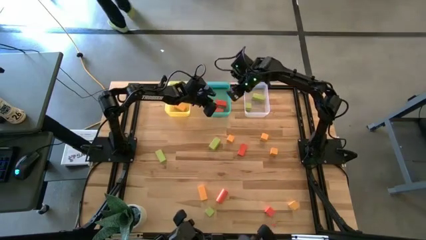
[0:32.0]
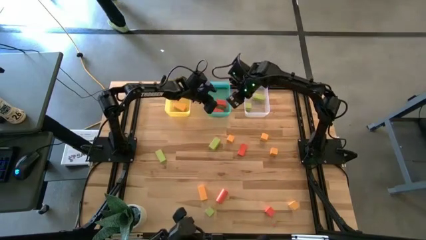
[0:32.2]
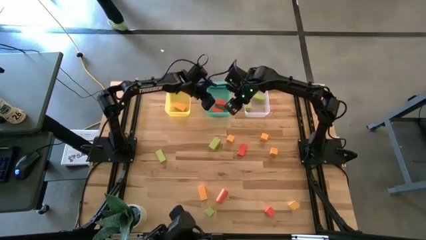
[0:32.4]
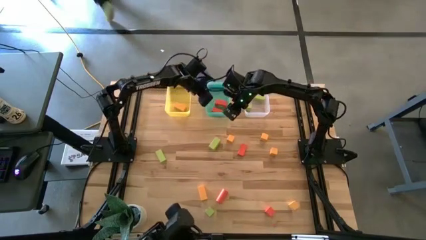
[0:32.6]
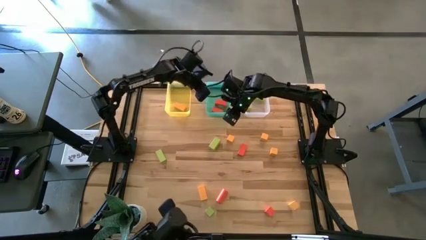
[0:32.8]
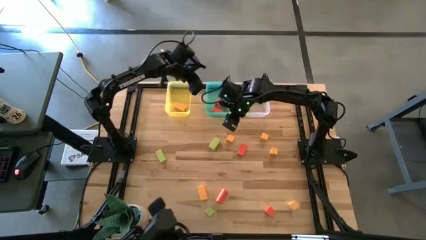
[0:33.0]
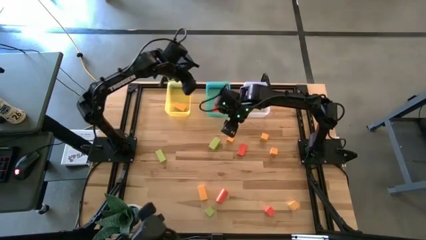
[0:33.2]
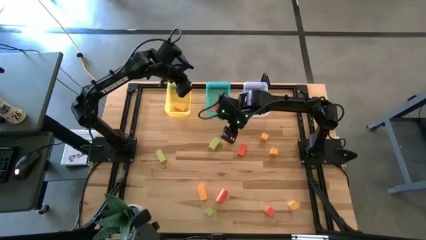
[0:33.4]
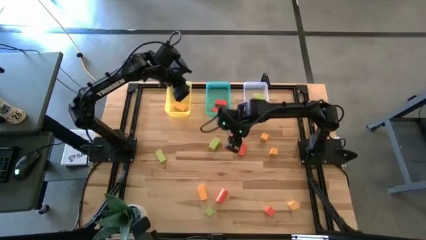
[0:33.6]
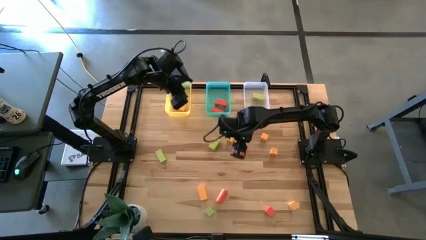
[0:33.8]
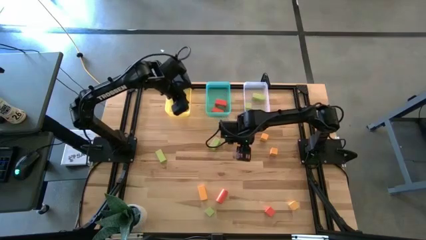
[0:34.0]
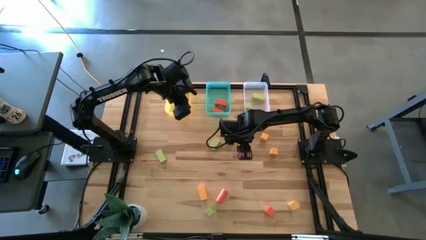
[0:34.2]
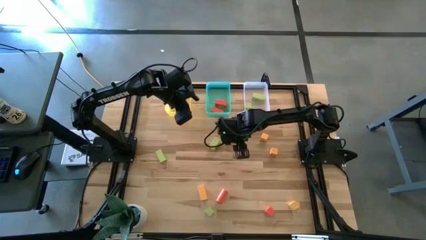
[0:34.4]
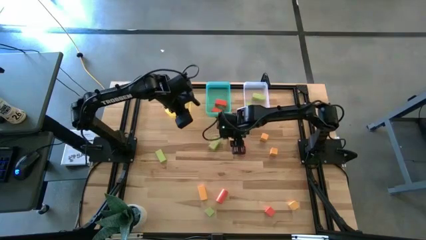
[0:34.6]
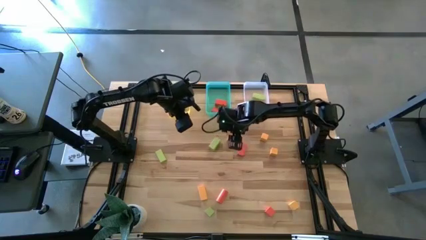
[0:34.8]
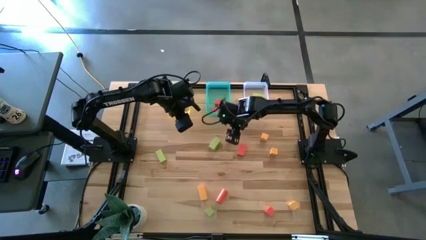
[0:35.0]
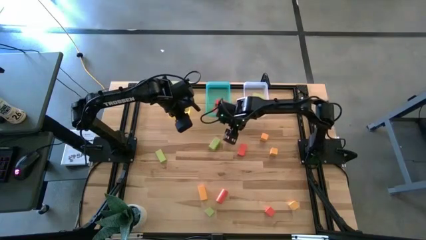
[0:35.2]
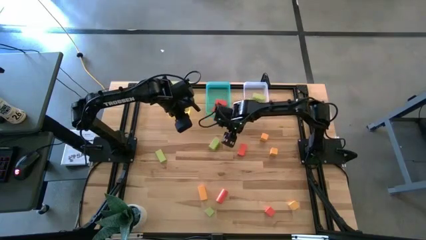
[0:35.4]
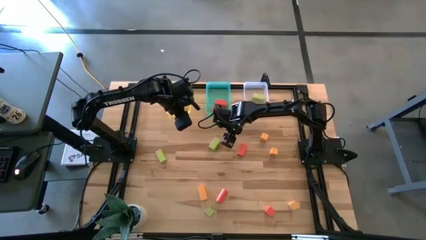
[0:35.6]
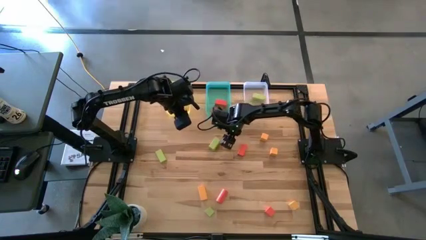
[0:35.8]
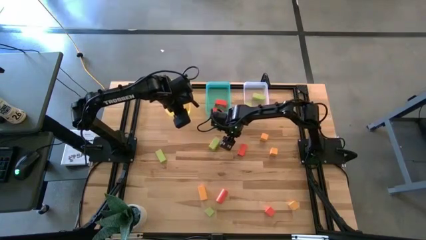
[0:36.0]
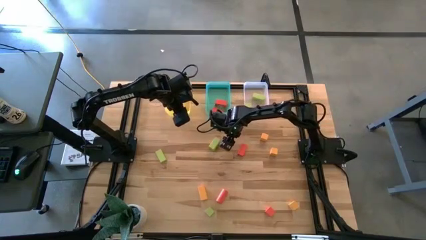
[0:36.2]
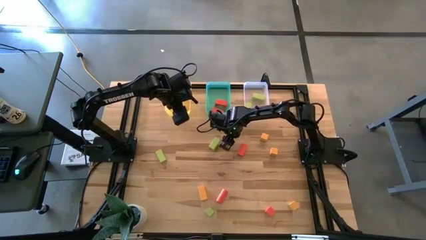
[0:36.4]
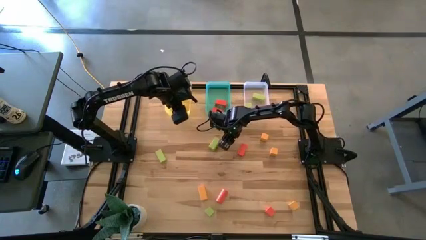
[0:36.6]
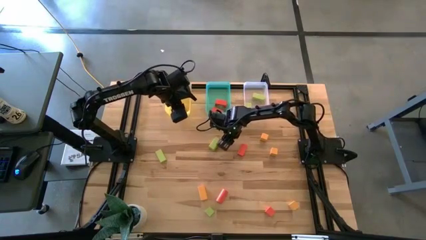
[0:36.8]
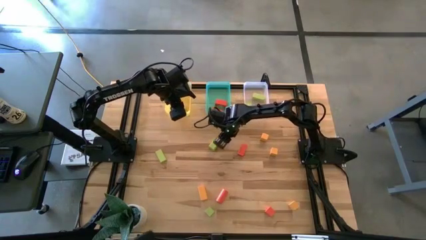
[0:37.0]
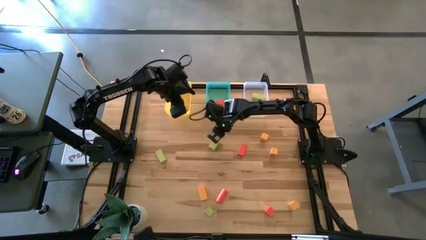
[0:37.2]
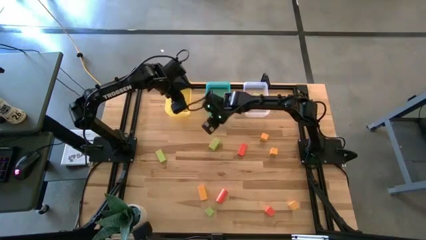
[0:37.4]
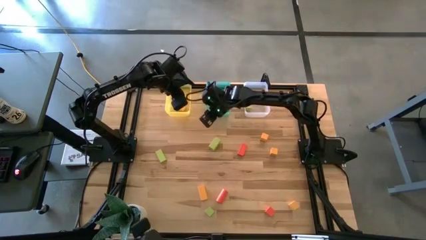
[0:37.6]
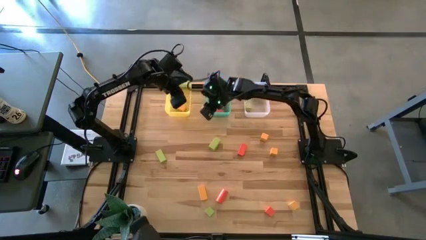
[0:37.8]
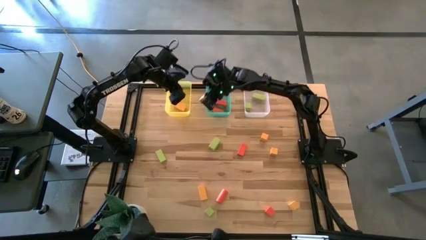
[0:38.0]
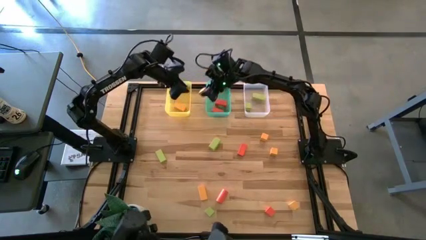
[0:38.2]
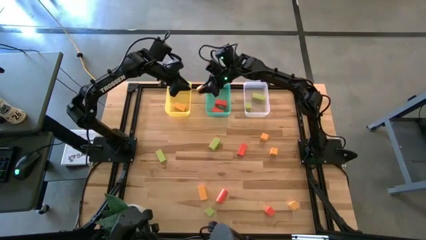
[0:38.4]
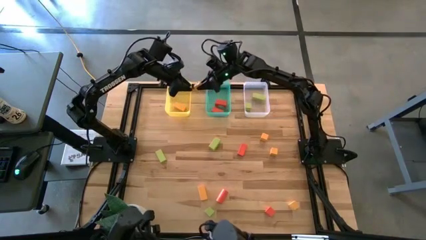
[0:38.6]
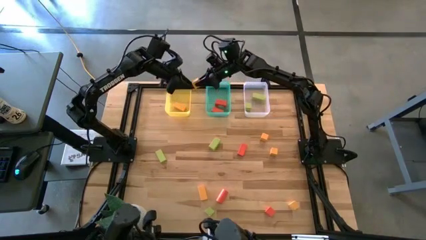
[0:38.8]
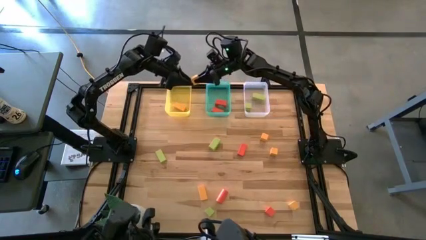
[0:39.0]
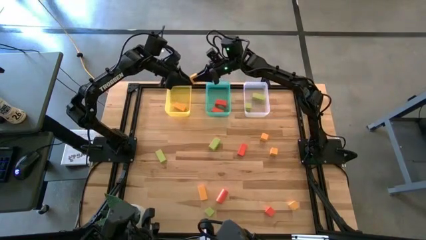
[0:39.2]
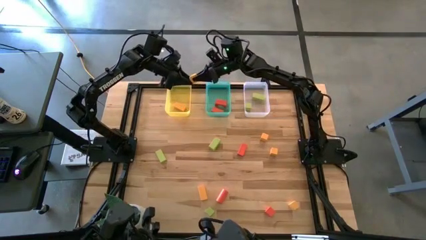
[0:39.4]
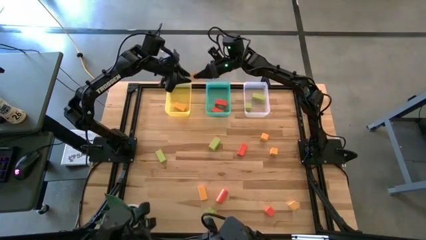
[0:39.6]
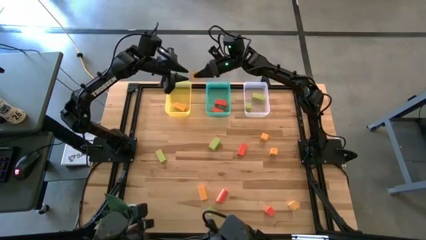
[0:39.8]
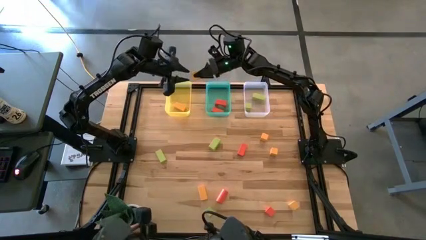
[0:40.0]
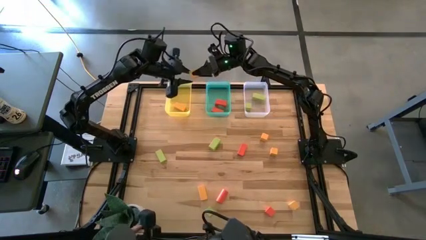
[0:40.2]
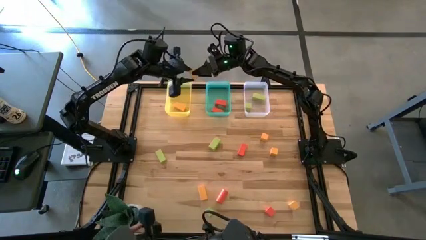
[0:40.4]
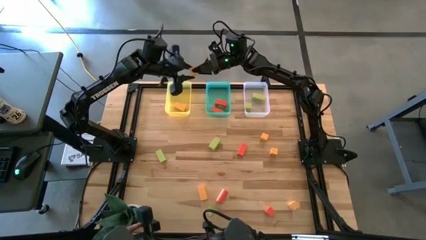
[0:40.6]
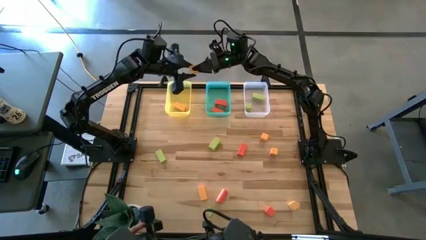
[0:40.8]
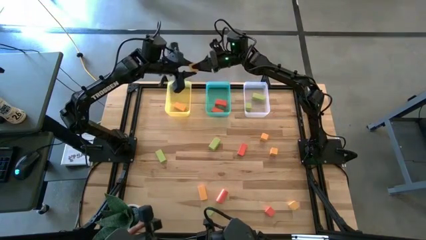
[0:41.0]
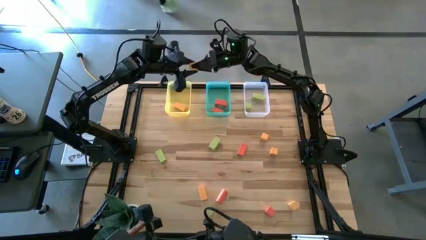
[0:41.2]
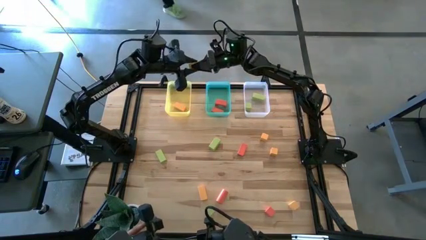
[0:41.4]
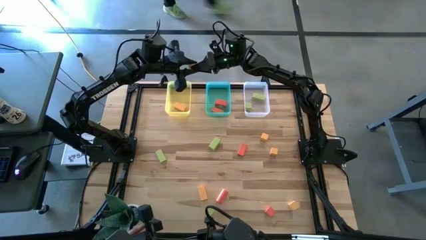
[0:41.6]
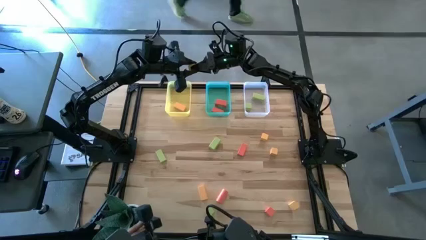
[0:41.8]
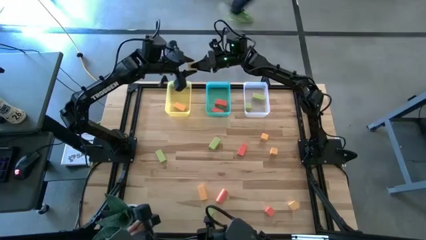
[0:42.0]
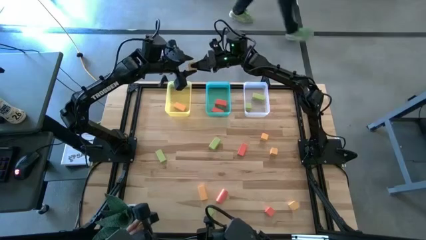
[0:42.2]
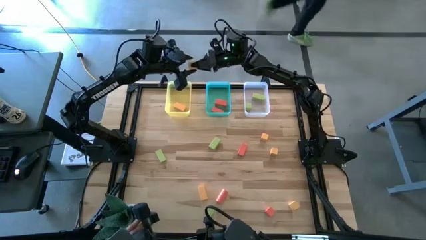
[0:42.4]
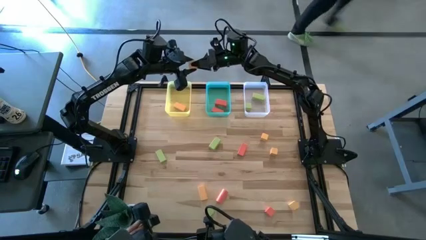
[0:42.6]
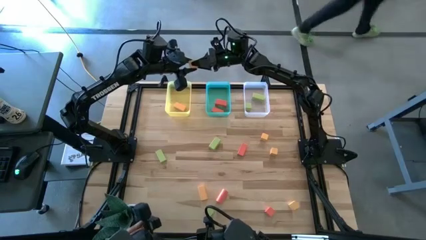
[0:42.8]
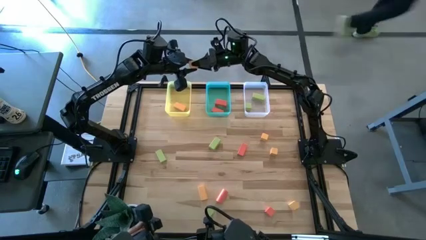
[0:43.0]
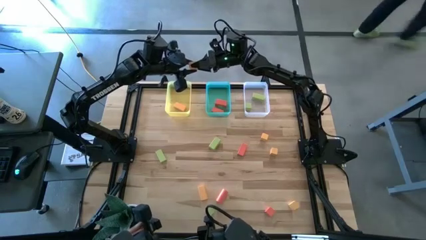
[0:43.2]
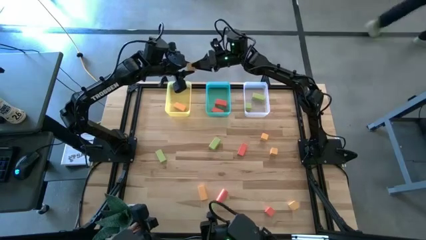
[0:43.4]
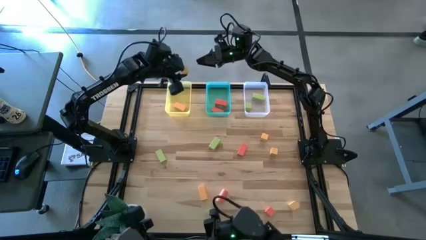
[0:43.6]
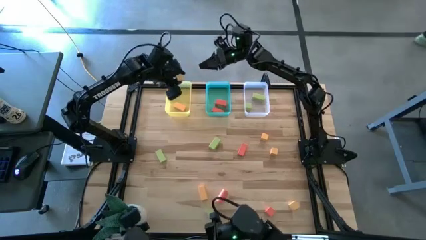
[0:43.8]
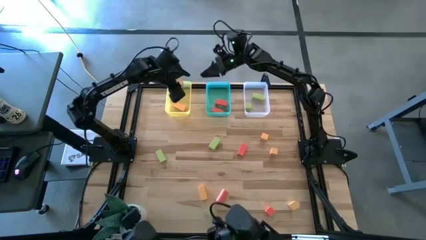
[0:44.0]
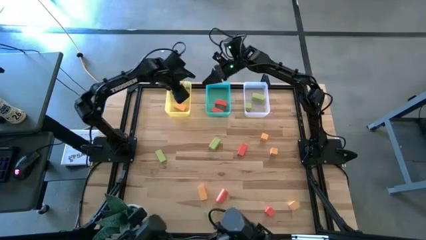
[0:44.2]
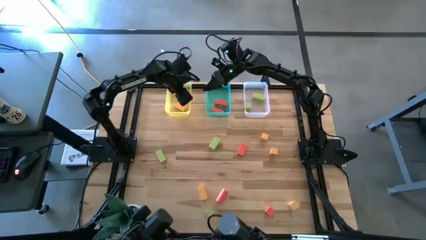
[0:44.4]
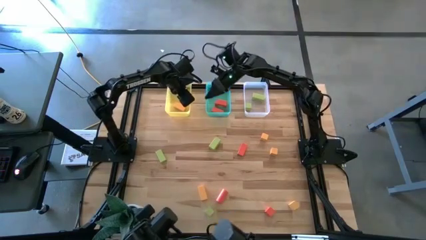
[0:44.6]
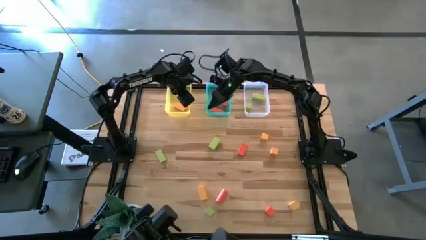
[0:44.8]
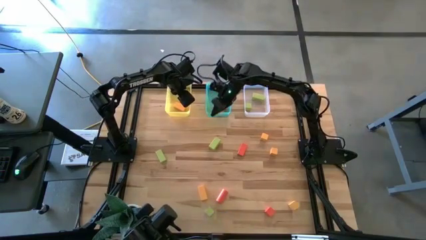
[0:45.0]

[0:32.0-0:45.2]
Task: Sort & place blocks by color
Put the yellow block into the yellow bin

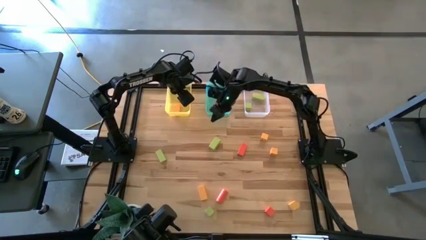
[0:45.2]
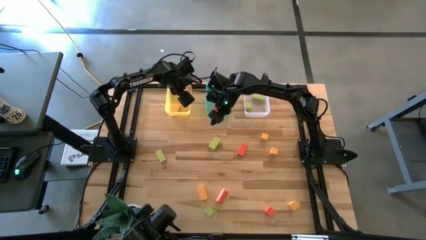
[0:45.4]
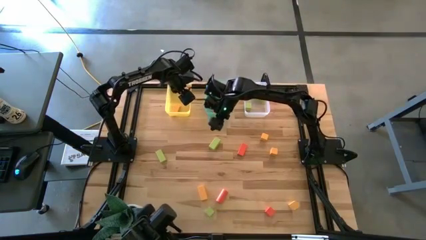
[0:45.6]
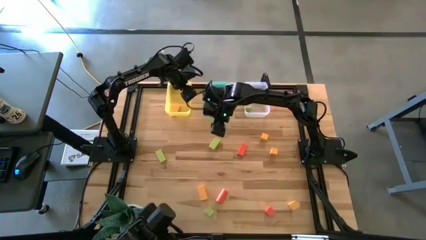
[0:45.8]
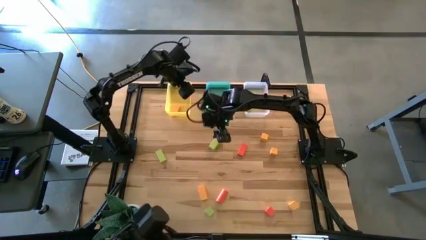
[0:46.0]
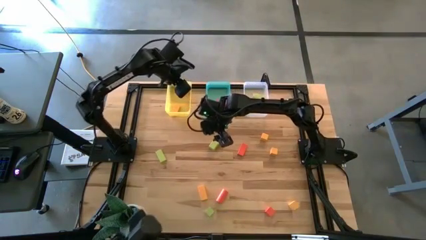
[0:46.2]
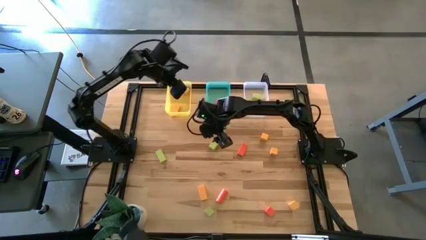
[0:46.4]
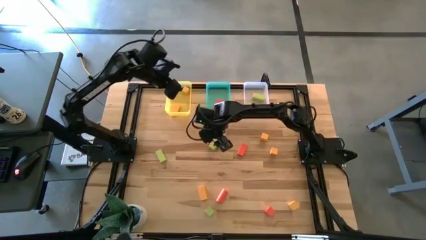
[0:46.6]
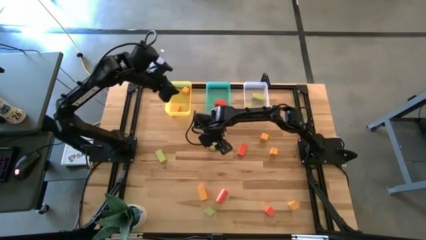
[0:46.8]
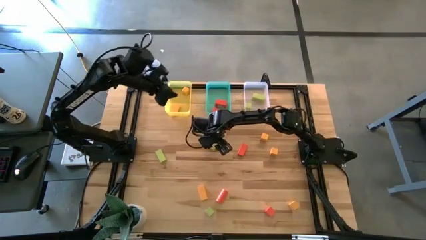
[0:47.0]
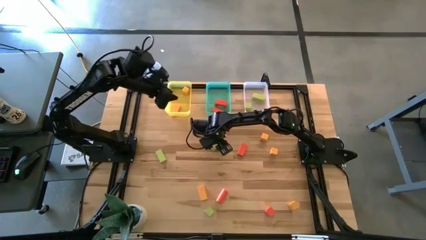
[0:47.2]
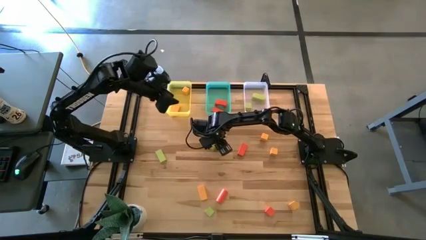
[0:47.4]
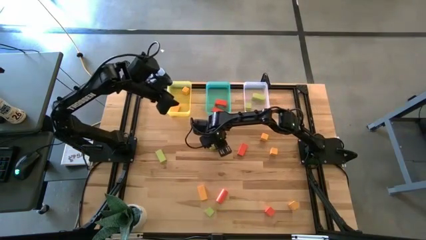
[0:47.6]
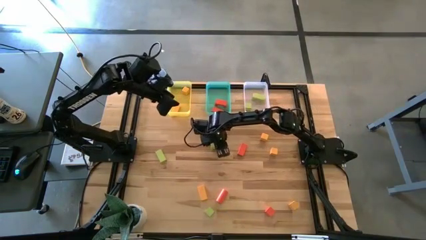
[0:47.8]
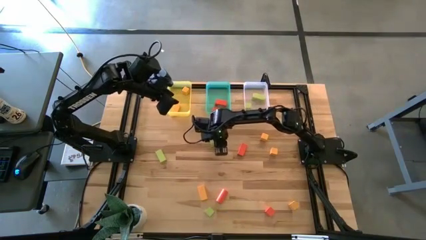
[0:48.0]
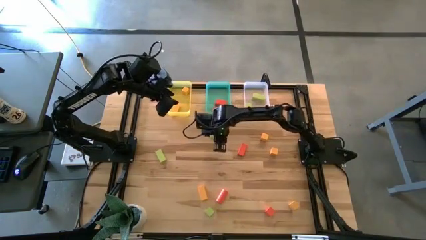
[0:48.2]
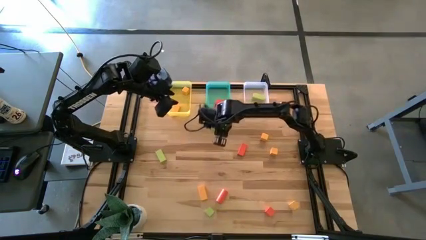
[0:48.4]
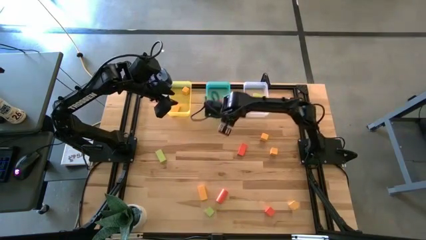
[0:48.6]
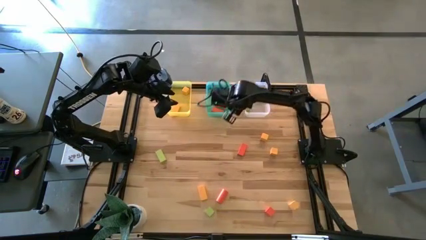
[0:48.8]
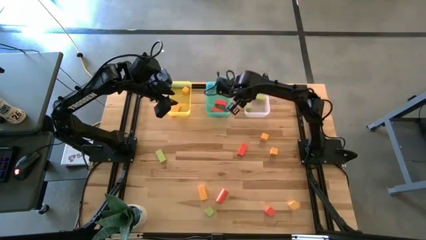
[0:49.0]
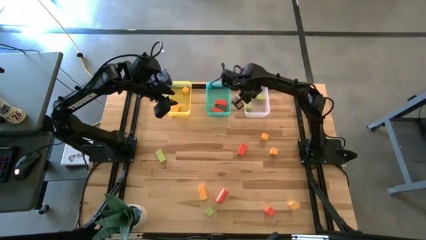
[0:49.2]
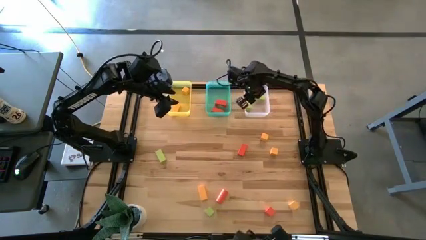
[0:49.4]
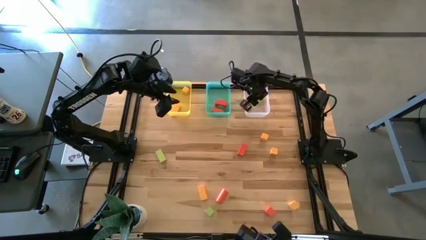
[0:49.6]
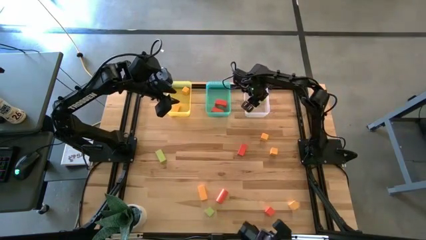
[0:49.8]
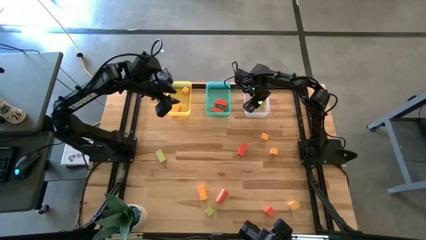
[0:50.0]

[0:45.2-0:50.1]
Put the light green block into the white bin
